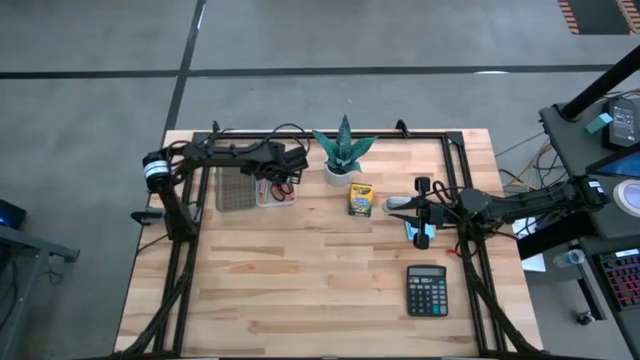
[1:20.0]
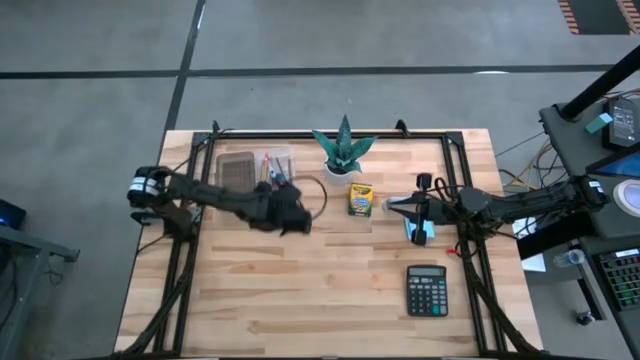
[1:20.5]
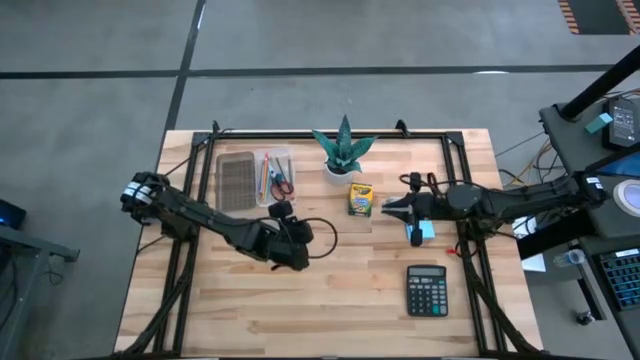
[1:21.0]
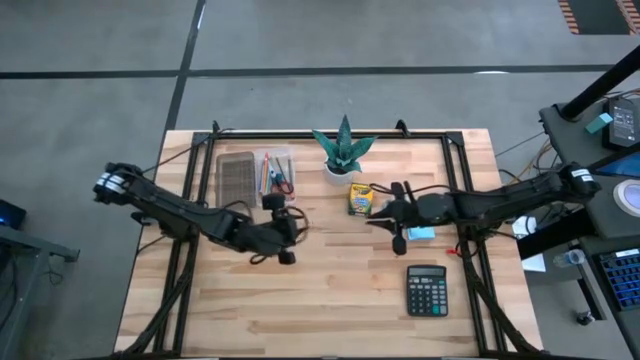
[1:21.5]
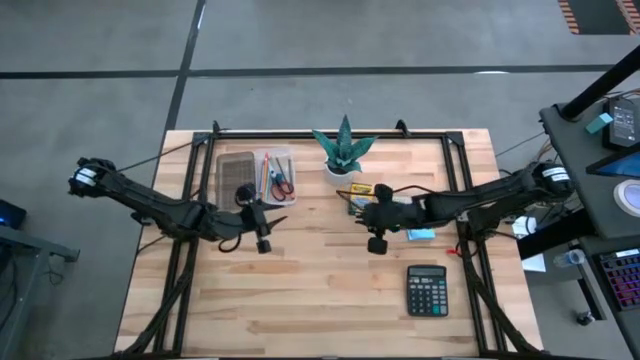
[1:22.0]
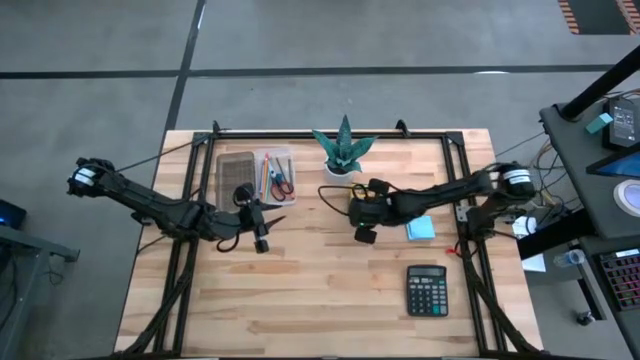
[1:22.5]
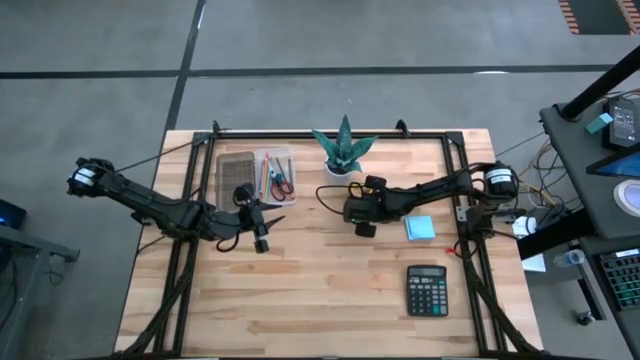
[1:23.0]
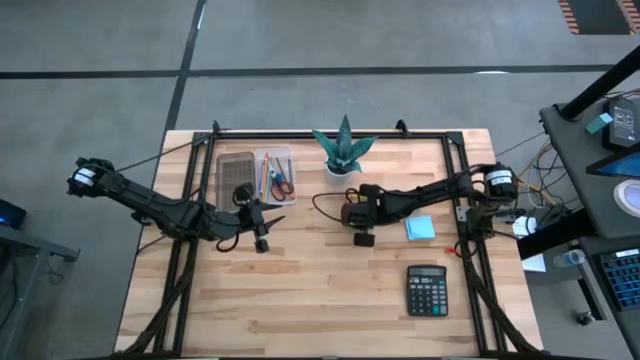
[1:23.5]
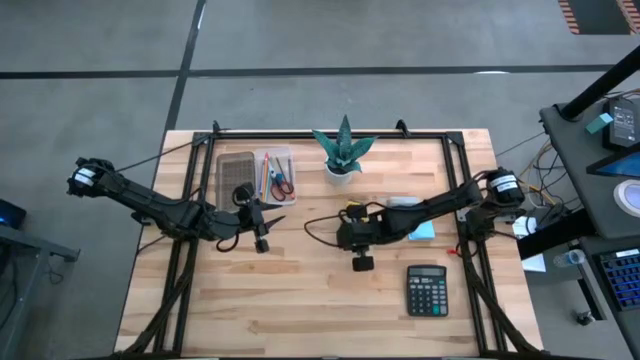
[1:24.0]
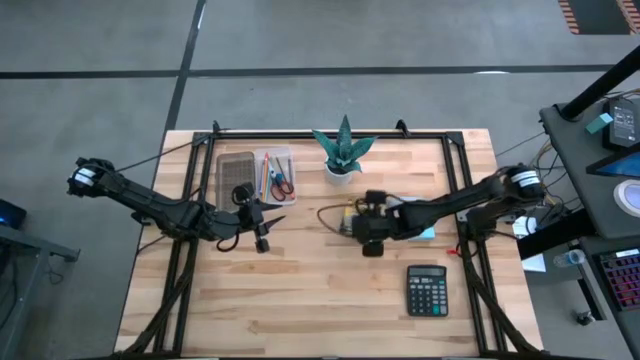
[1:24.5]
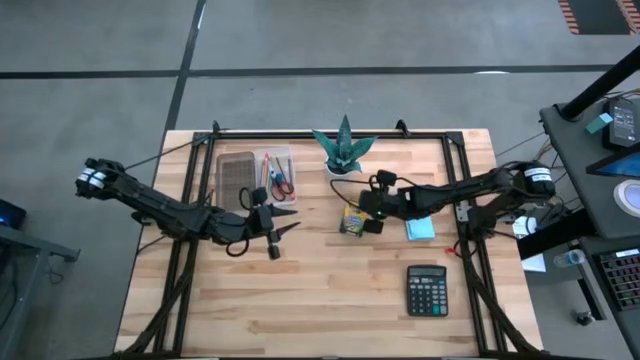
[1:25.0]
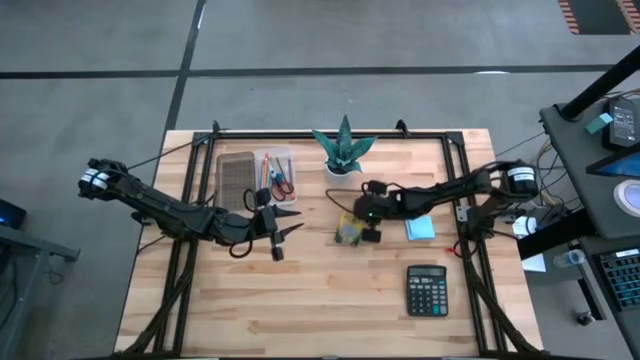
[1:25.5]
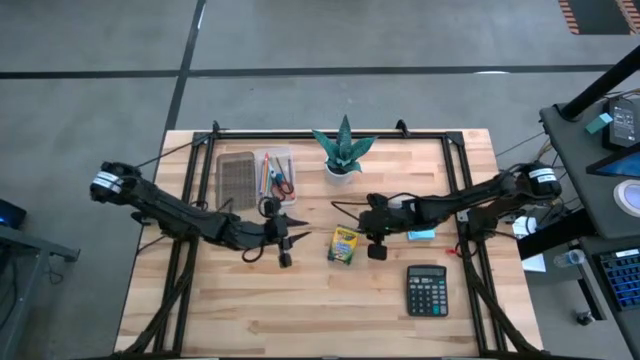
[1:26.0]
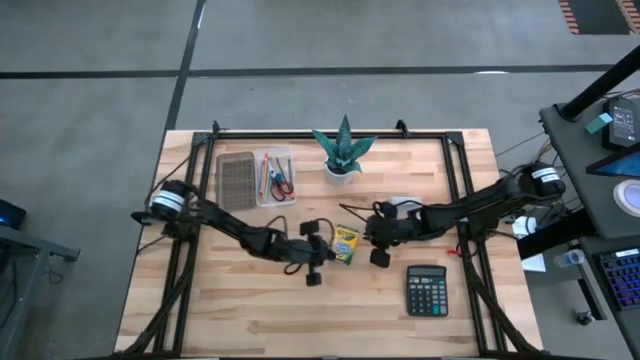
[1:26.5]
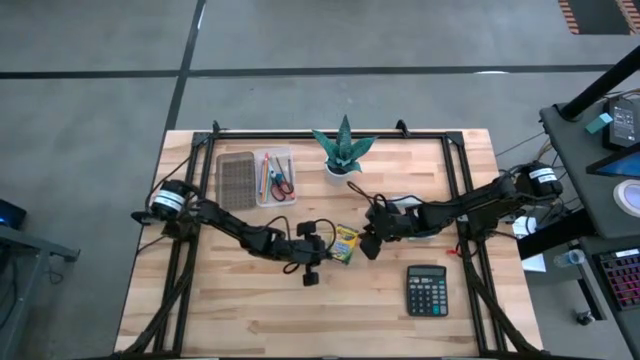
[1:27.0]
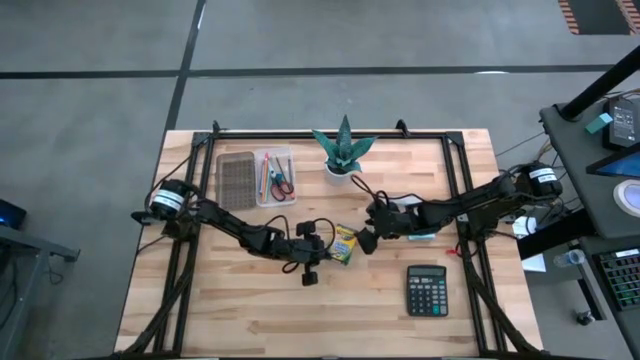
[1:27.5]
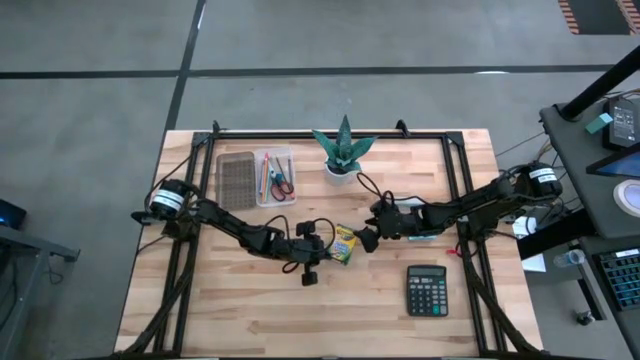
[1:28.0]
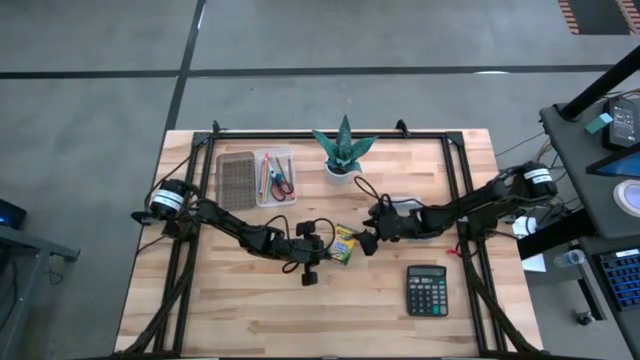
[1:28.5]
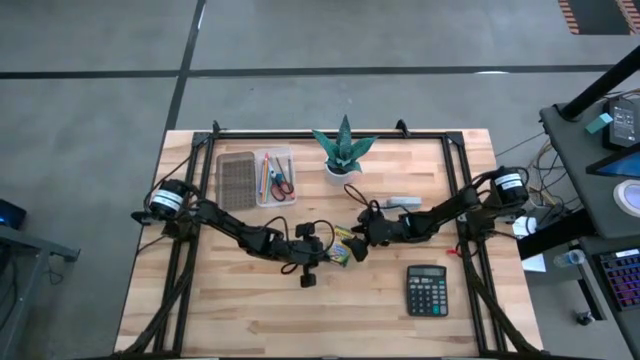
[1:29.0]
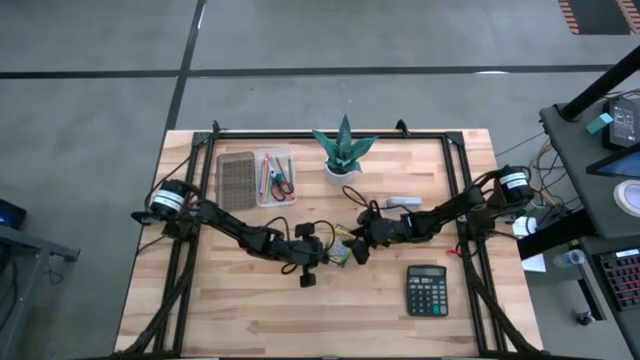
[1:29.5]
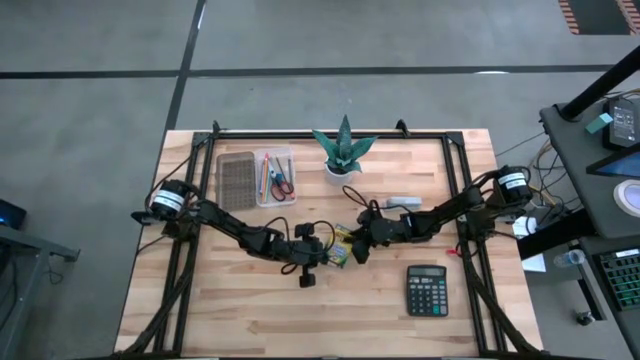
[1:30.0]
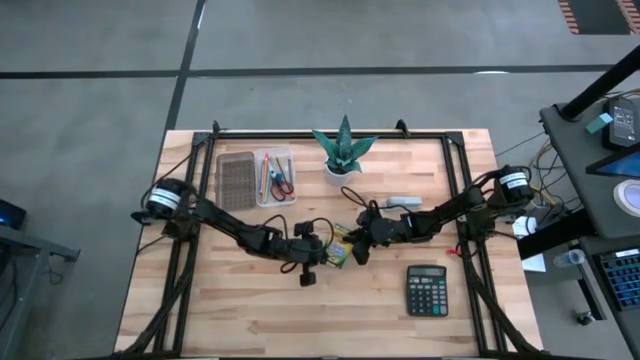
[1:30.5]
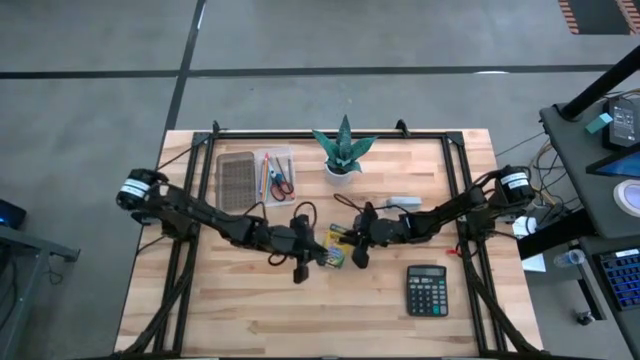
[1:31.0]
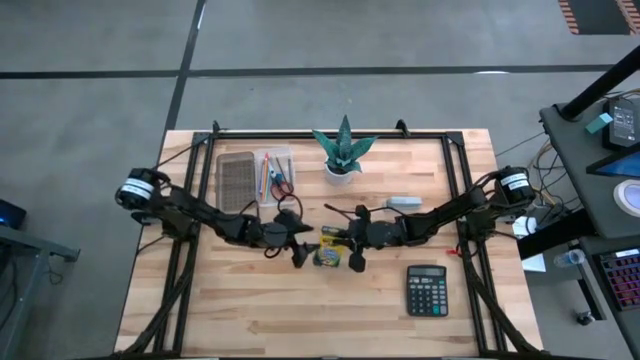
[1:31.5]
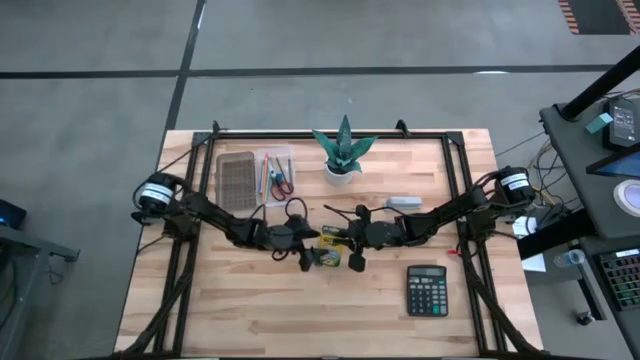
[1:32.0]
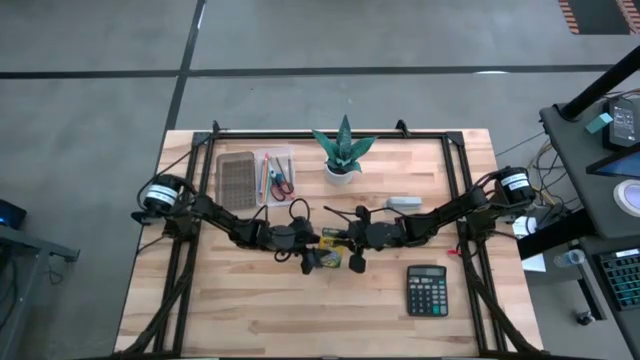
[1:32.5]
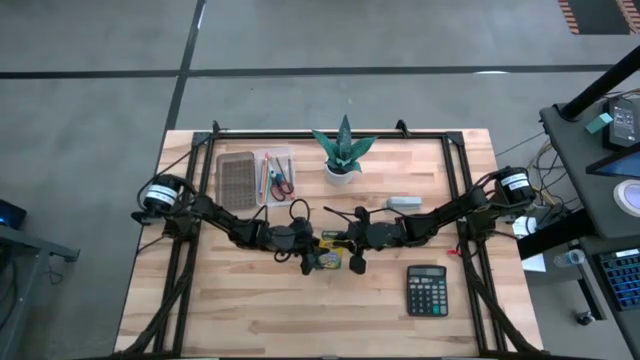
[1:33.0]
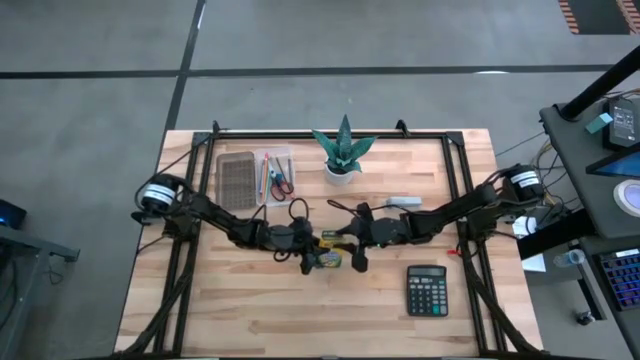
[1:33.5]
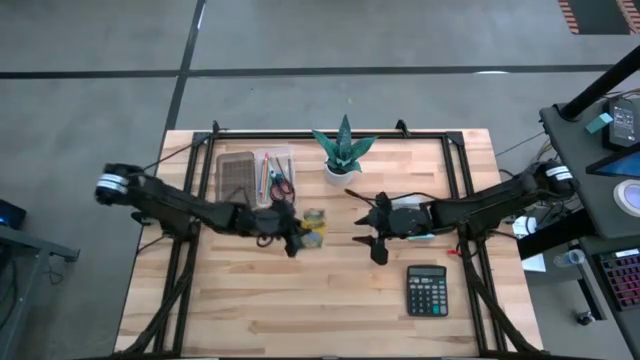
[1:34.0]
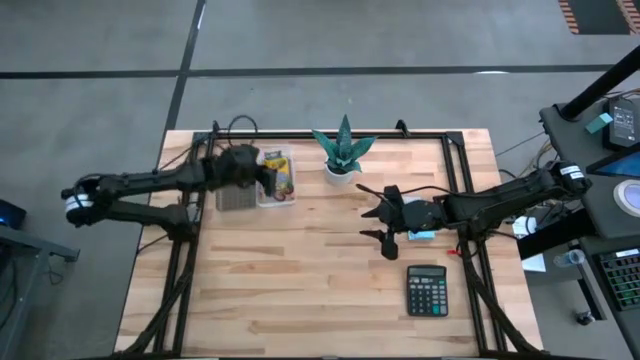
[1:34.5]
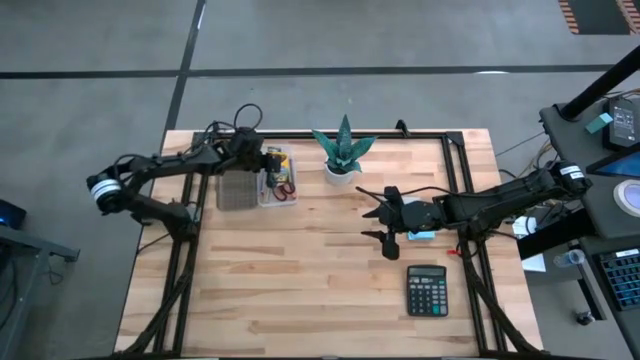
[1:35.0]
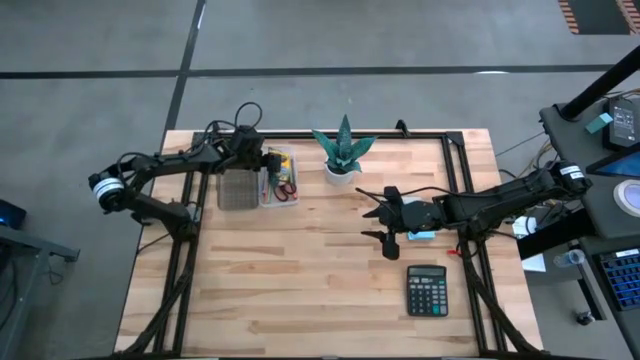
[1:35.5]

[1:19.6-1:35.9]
Task: Pack school essentials
Put the yellow crayon box into the black supply box

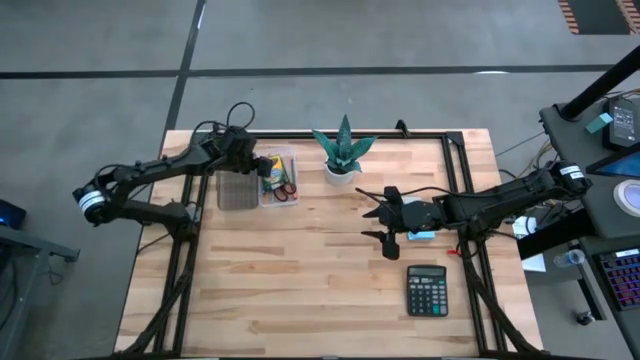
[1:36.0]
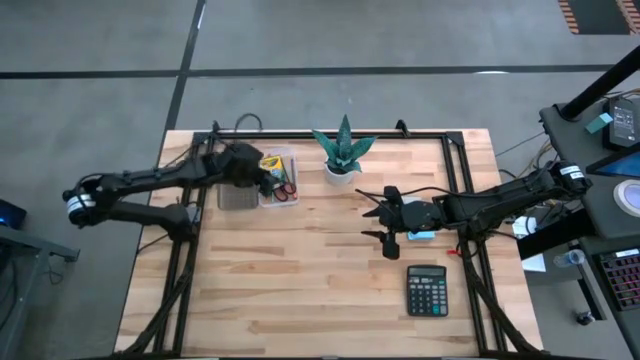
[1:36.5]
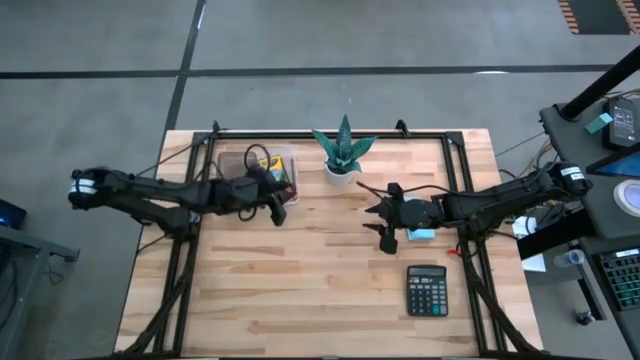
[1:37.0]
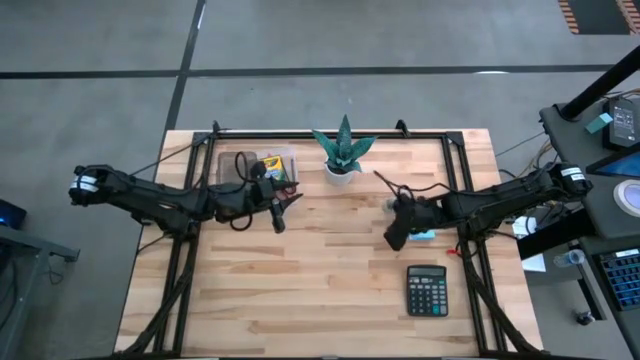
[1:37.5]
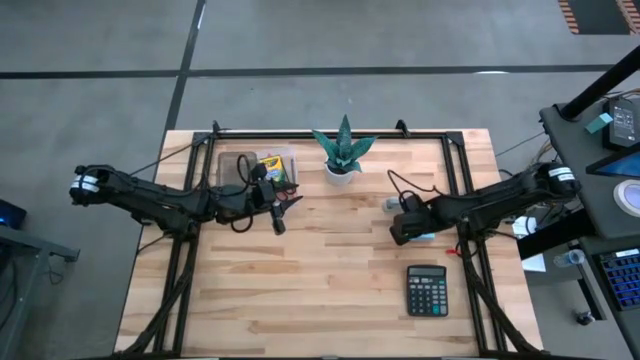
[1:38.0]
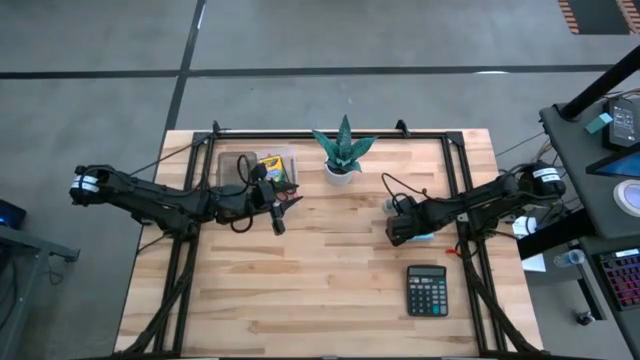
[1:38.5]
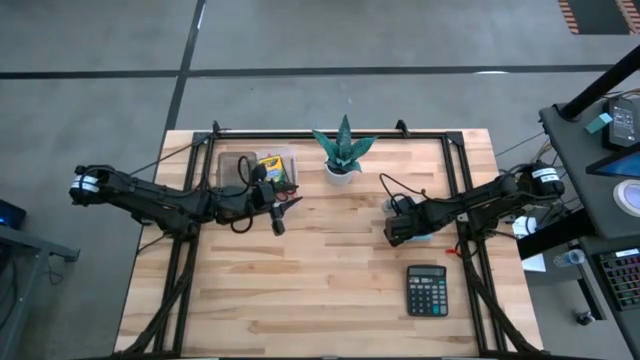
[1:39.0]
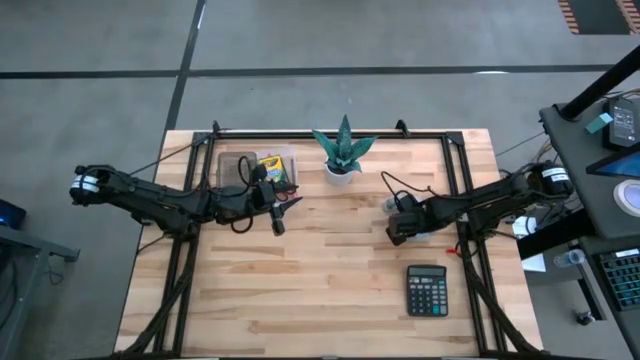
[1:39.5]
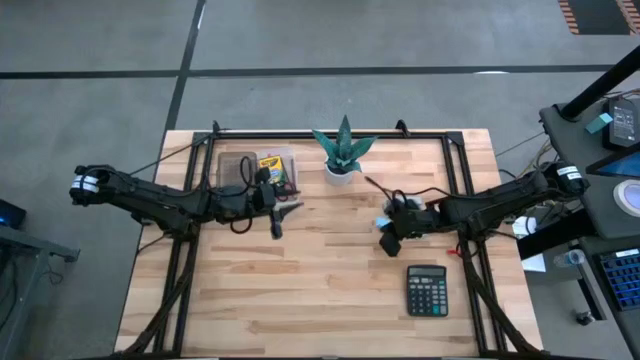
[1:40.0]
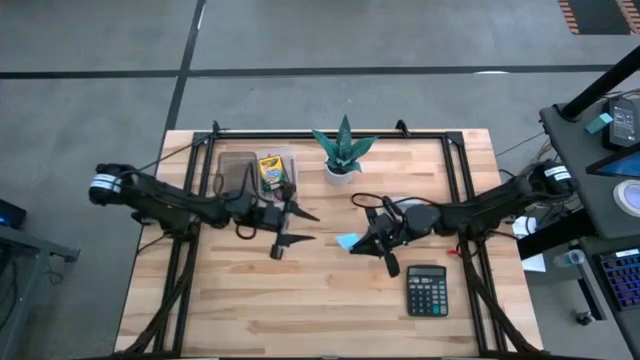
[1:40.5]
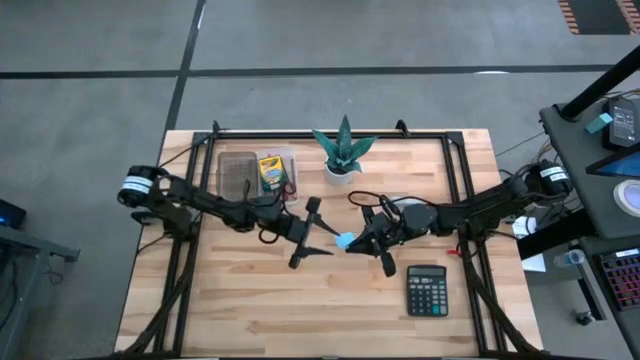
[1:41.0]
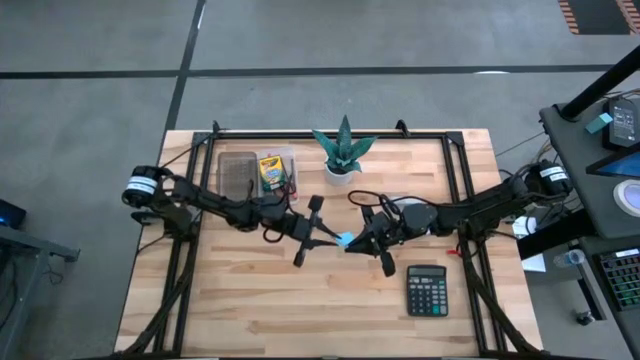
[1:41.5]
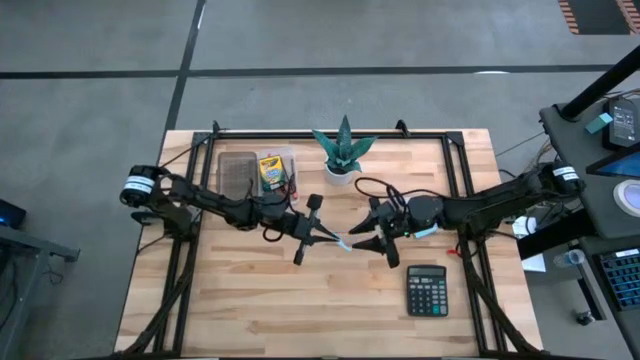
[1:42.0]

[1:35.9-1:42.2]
Put the blue sticky note into the black supply box
